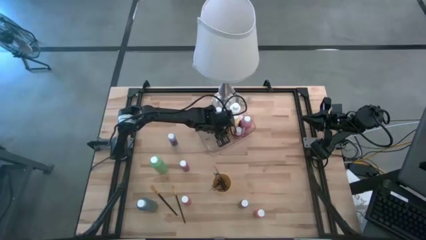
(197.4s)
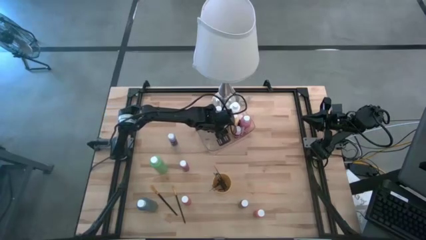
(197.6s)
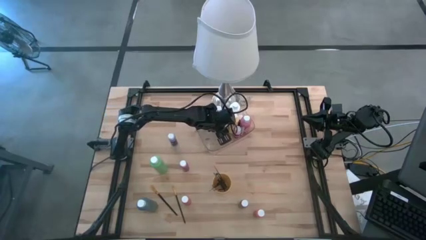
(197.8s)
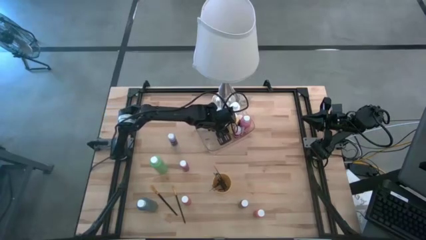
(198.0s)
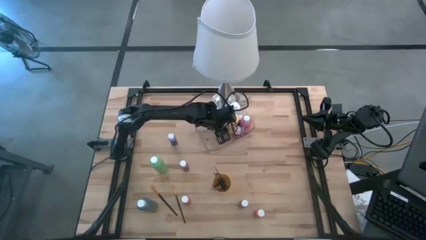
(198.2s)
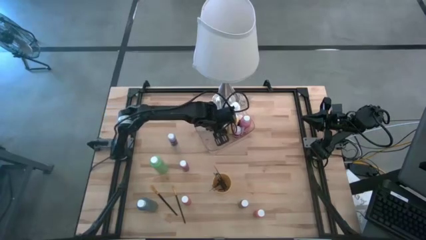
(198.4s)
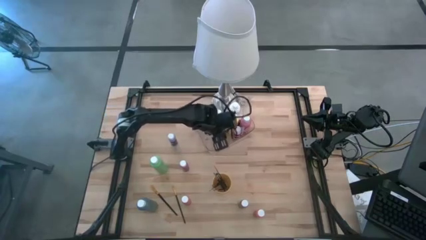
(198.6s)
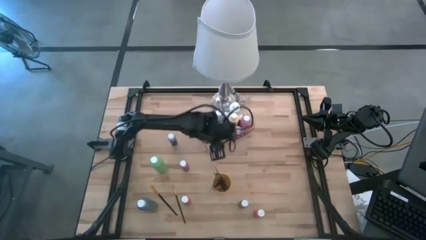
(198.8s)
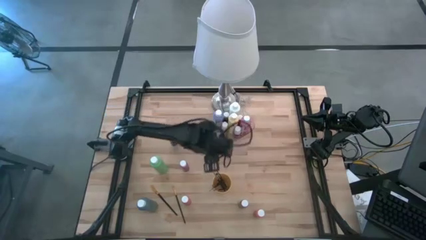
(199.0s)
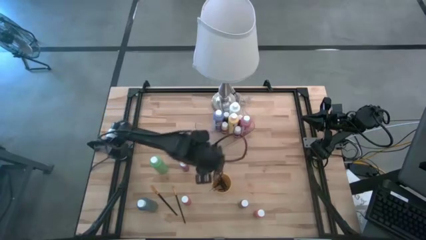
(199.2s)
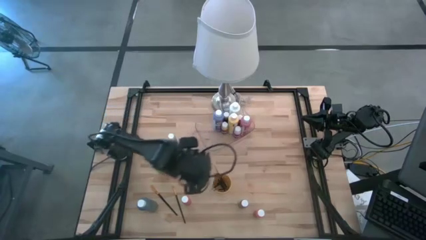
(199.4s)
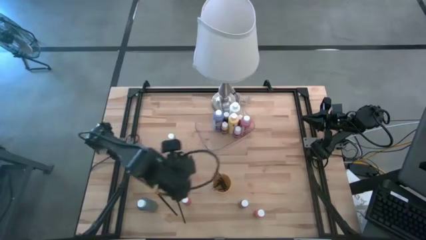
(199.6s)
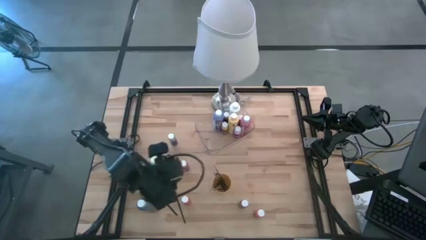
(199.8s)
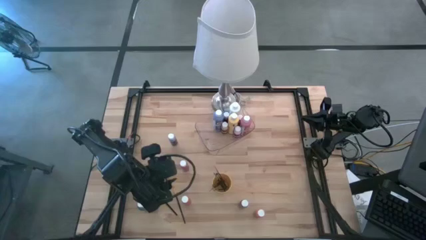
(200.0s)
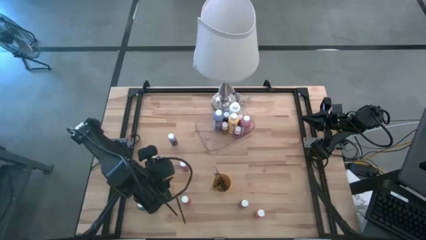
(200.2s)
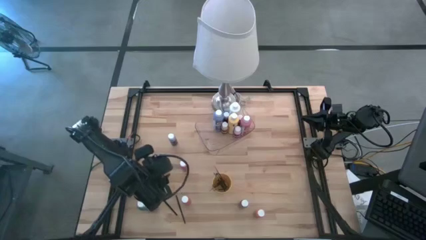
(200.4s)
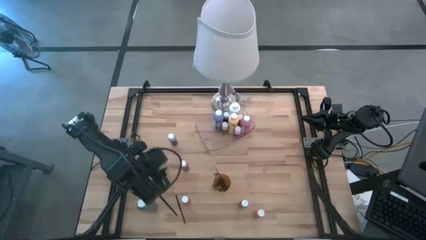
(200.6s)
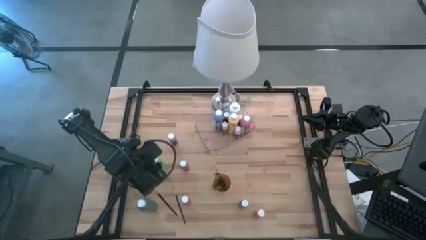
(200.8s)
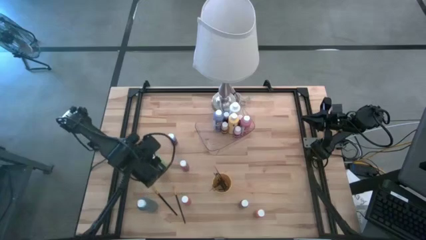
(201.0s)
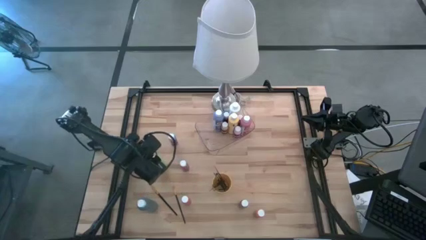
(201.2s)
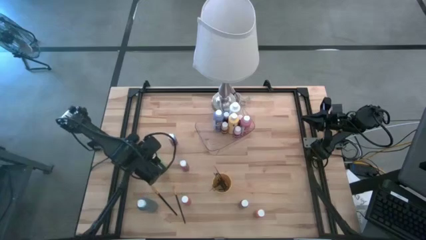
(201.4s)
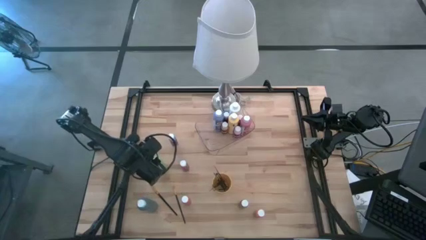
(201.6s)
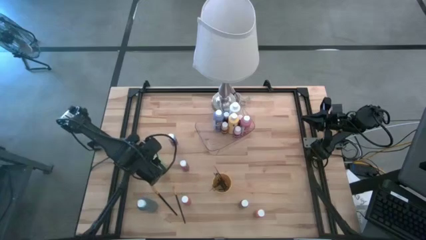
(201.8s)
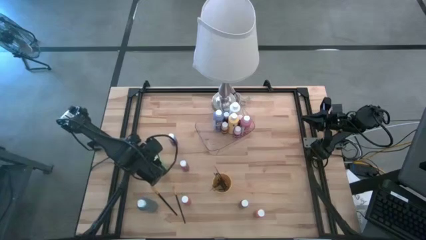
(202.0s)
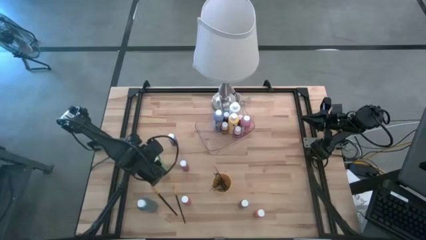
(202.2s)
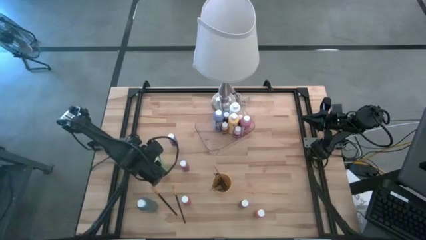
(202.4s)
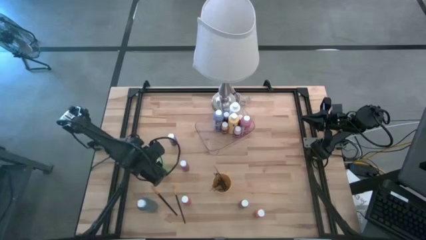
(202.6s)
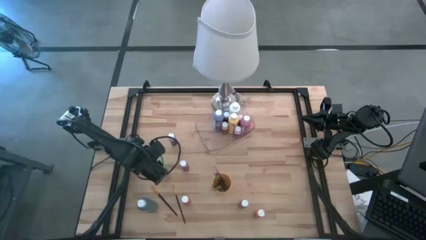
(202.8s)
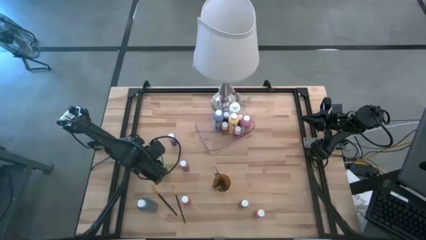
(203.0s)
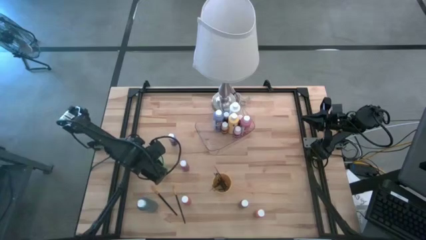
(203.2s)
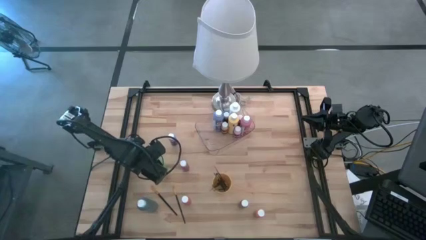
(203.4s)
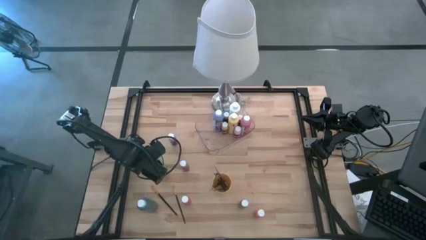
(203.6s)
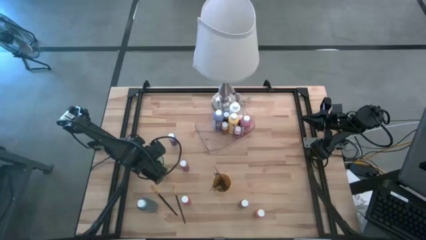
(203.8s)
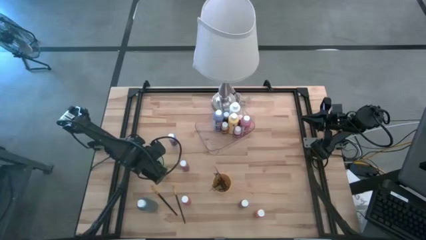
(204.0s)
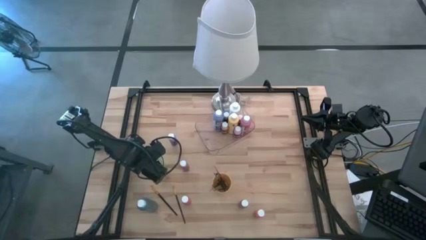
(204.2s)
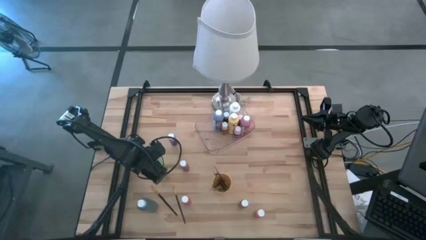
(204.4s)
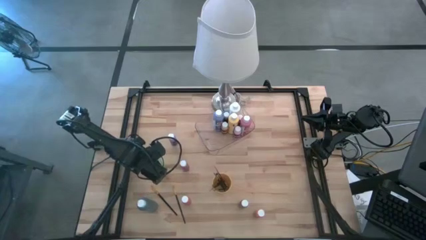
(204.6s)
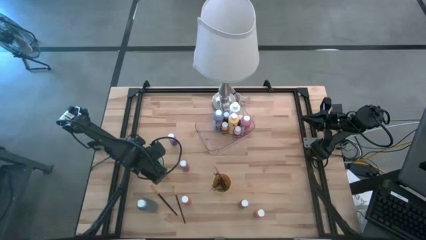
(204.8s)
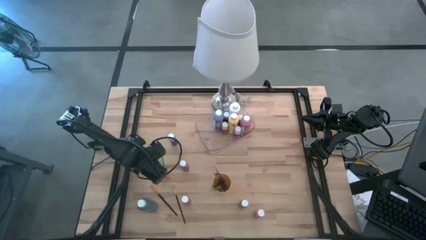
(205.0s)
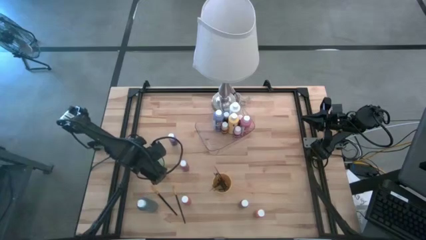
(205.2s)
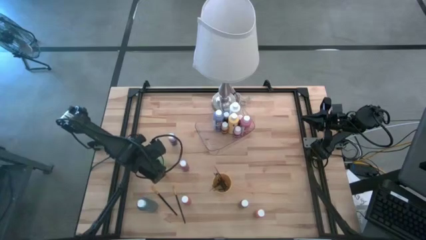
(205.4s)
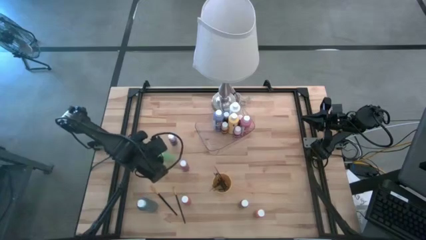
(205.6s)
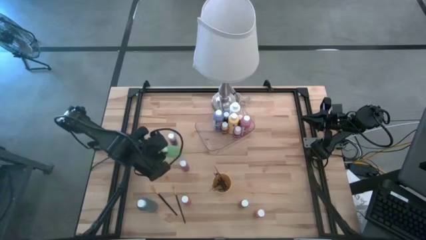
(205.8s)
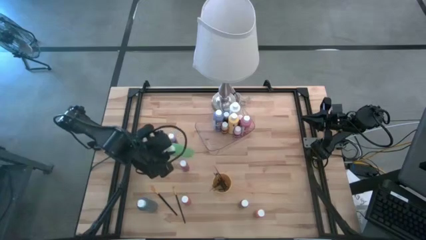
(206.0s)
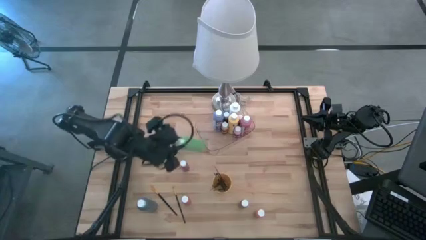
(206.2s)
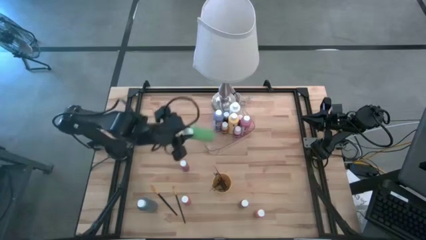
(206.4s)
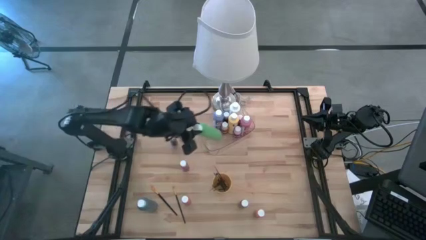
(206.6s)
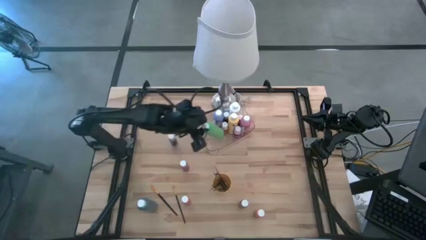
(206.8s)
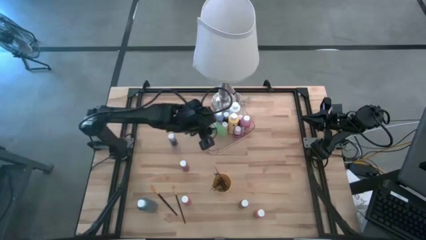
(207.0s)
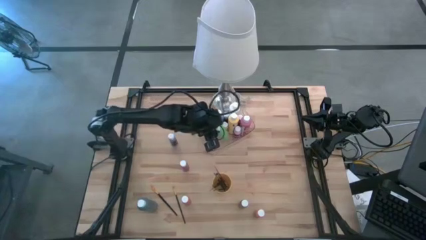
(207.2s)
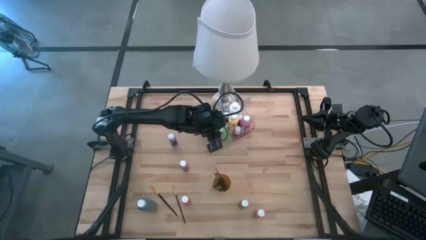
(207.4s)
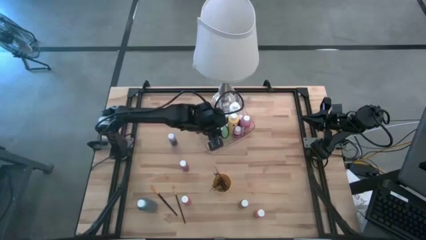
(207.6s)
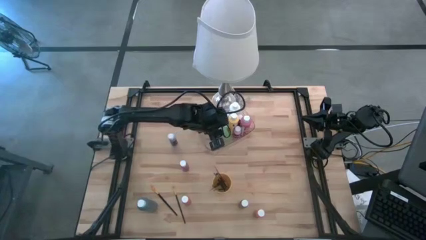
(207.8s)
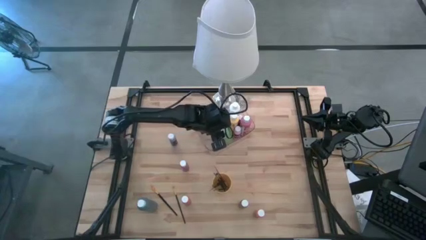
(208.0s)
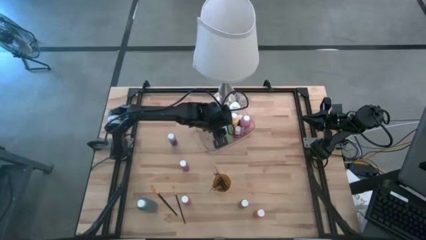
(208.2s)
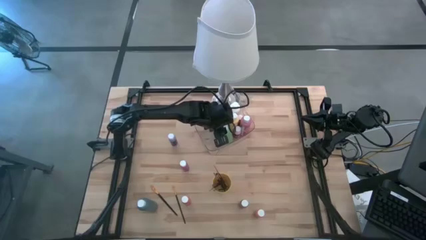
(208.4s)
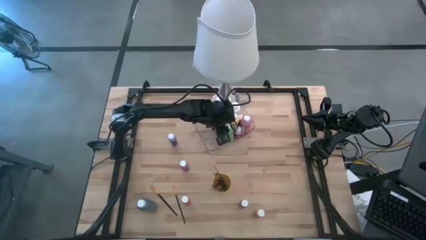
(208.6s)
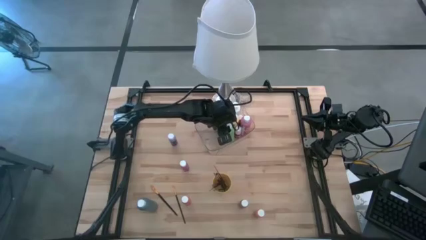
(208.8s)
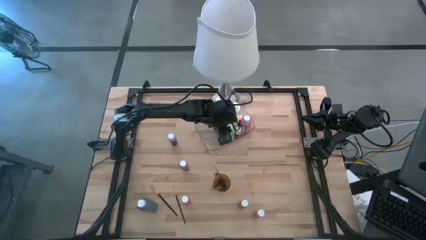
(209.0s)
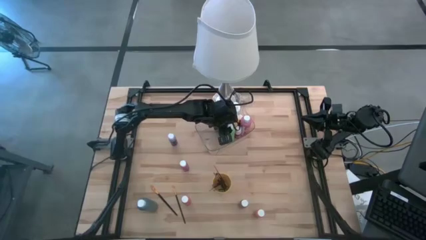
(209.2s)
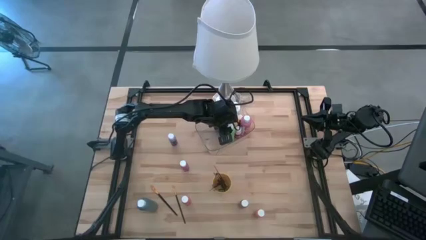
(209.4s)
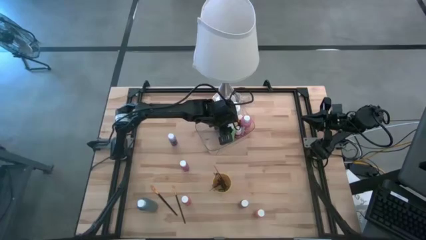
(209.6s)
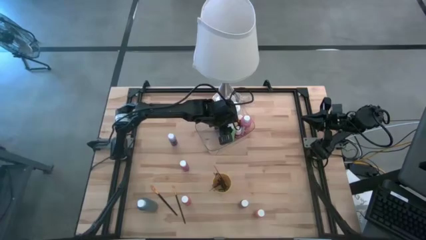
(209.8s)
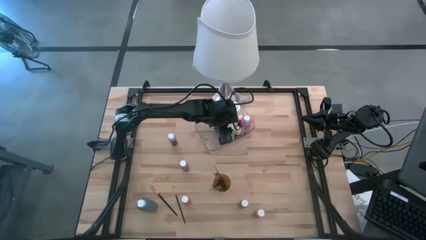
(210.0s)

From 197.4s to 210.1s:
Task: Pick & Place Paint Supplies
Put the green bottle into the transparent bin

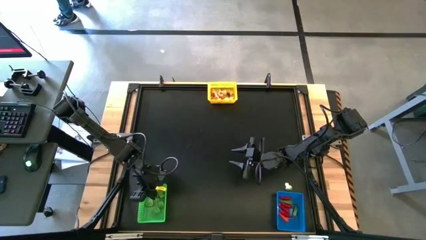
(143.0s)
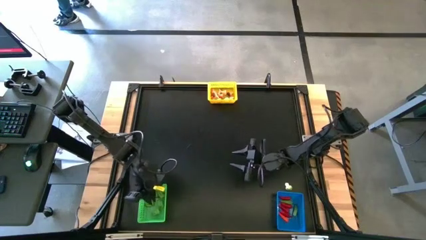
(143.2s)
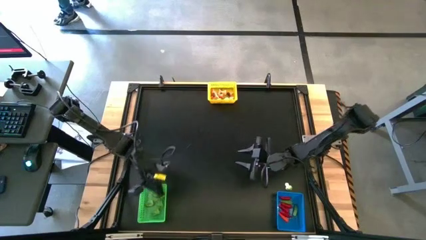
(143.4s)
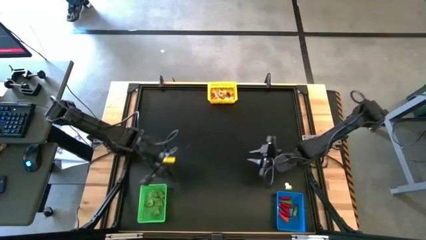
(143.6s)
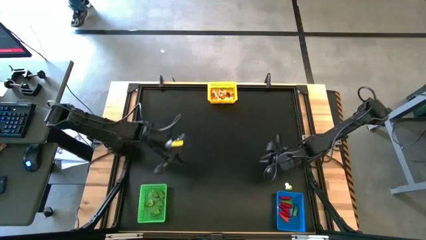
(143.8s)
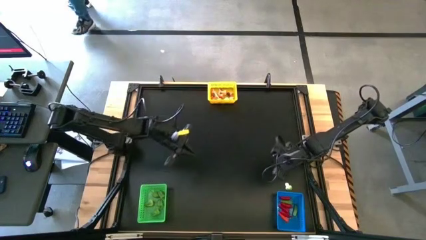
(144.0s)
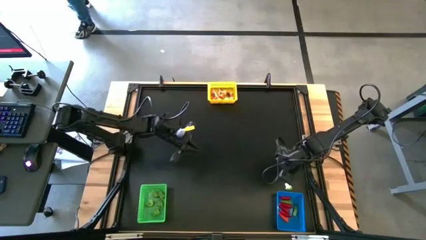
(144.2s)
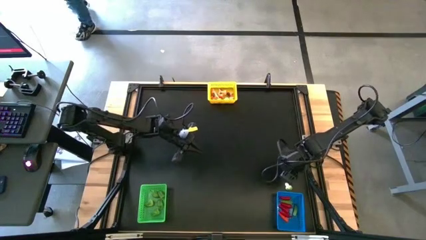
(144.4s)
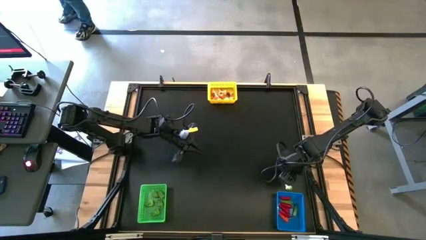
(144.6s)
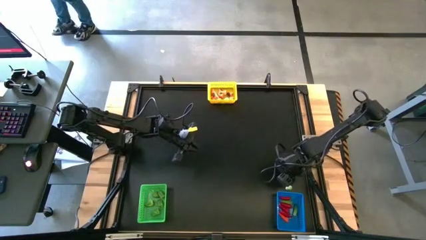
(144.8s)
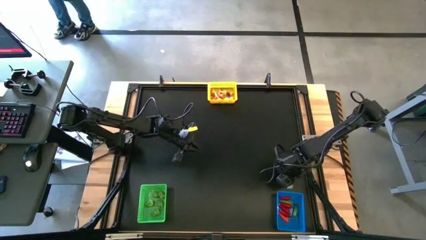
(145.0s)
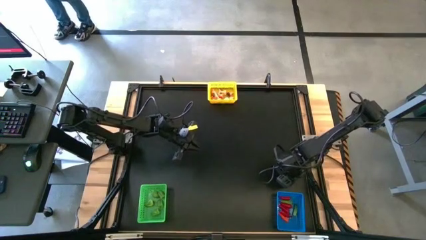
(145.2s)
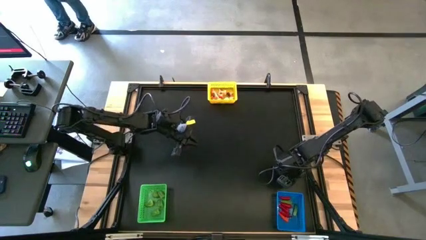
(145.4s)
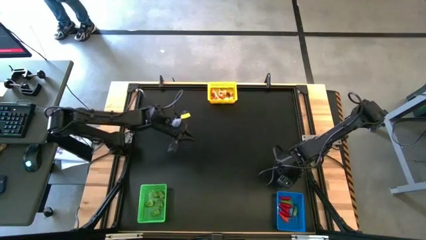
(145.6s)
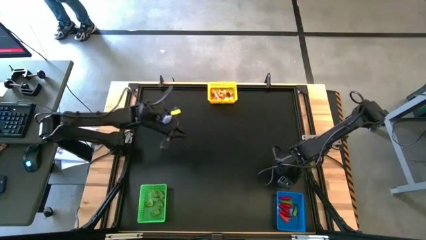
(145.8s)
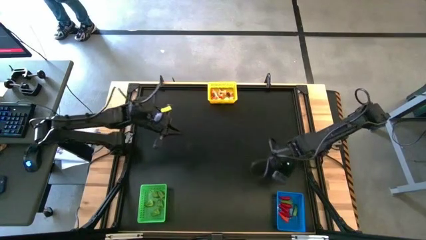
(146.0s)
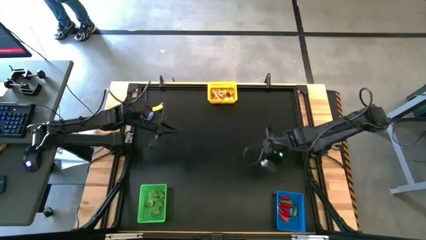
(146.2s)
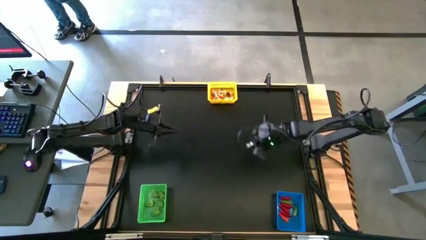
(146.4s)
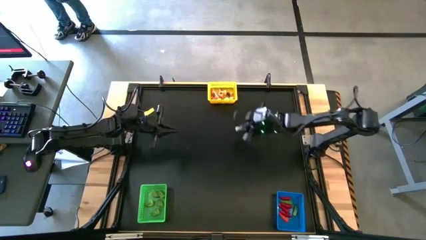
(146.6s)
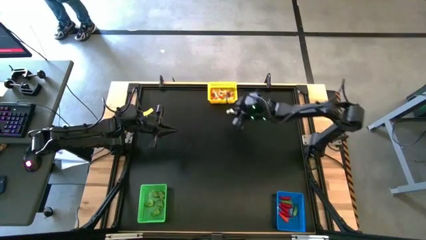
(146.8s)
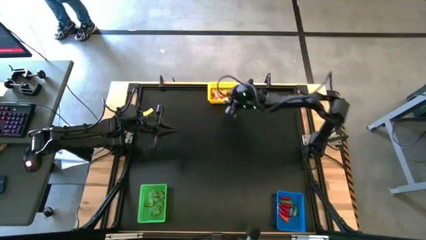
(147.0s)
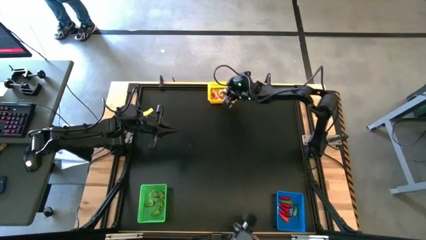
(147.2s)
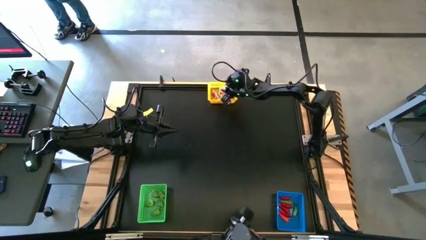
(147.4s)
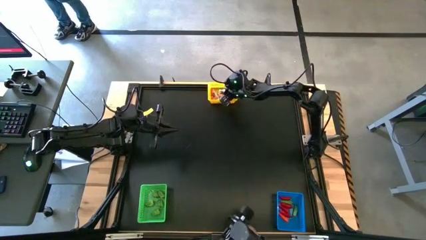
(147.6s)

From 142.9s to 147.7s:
Task: Sort produce into baskets
Put the green mushroom into the yellow bin
